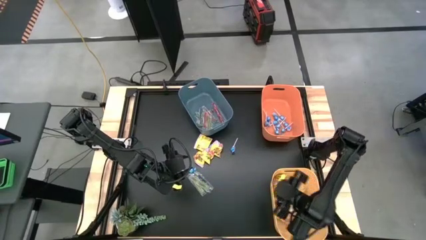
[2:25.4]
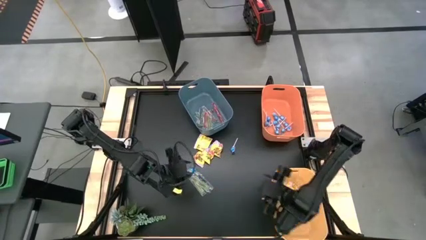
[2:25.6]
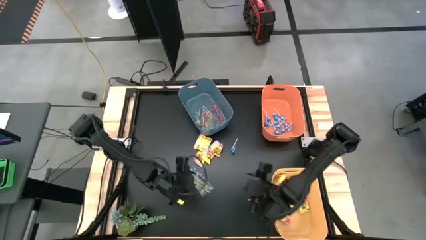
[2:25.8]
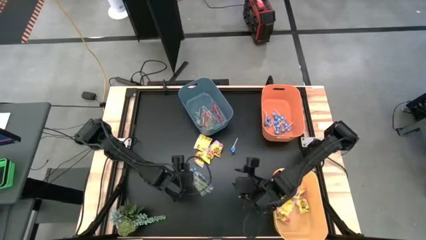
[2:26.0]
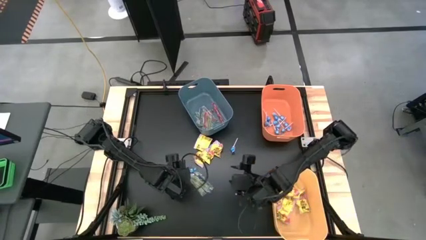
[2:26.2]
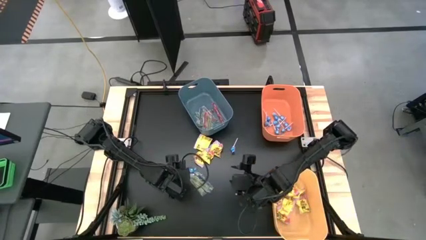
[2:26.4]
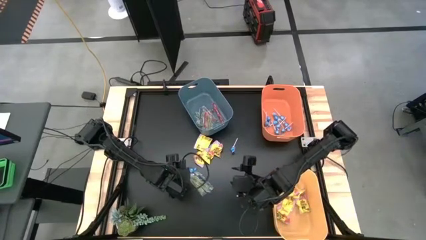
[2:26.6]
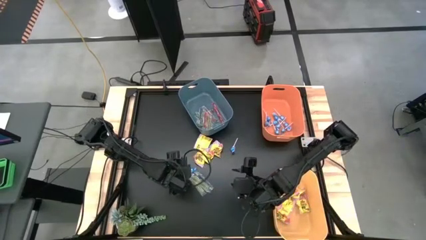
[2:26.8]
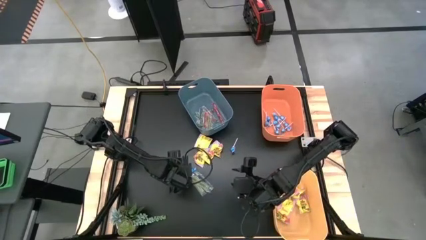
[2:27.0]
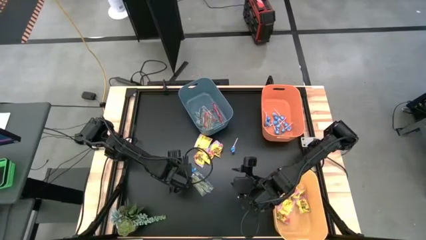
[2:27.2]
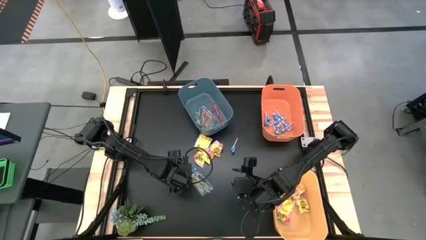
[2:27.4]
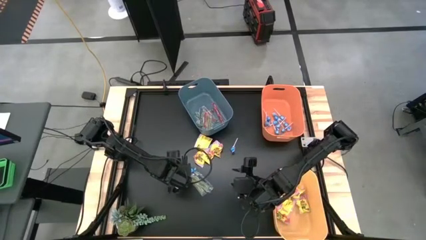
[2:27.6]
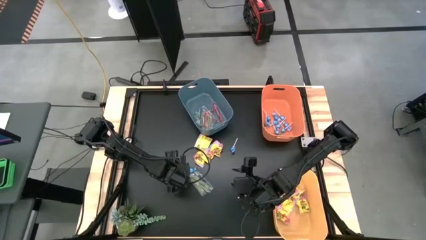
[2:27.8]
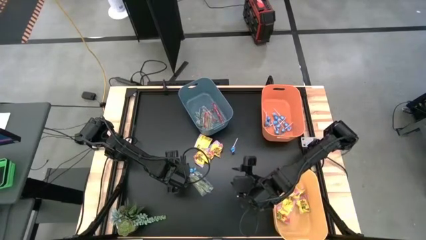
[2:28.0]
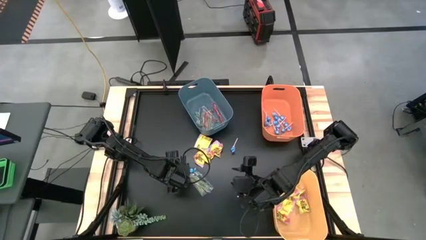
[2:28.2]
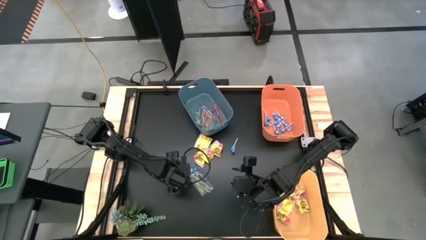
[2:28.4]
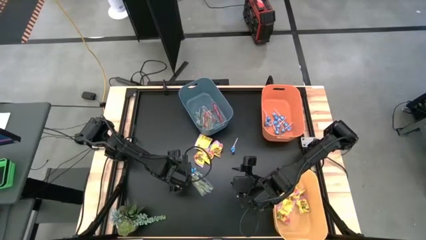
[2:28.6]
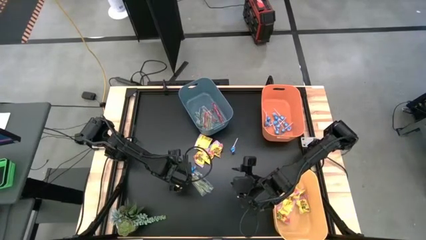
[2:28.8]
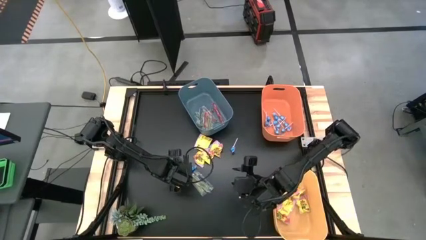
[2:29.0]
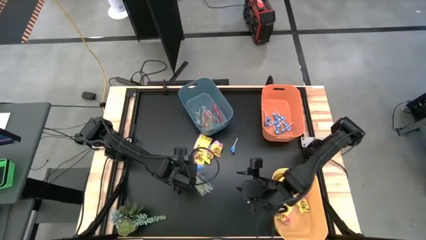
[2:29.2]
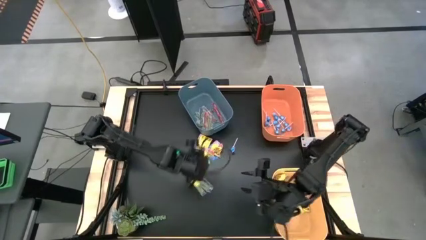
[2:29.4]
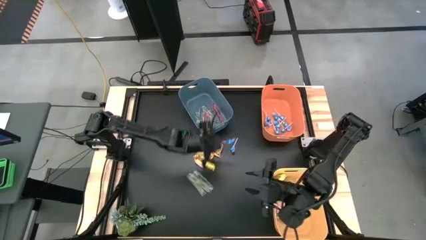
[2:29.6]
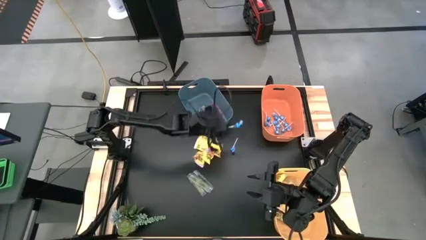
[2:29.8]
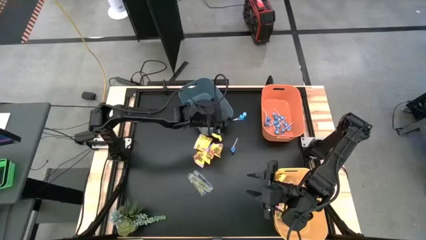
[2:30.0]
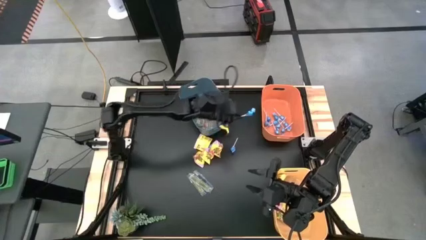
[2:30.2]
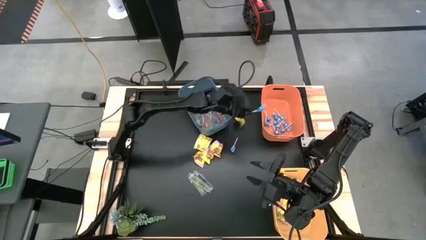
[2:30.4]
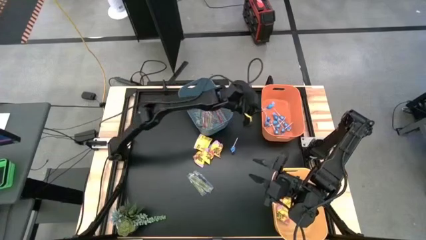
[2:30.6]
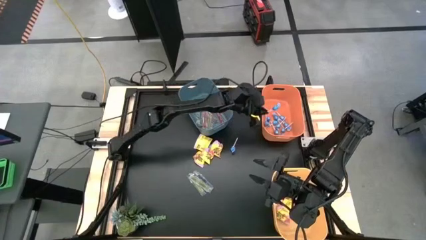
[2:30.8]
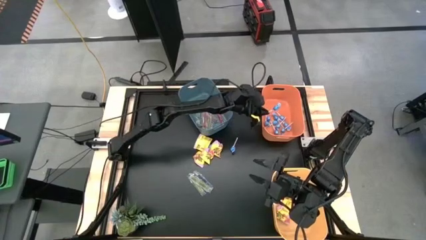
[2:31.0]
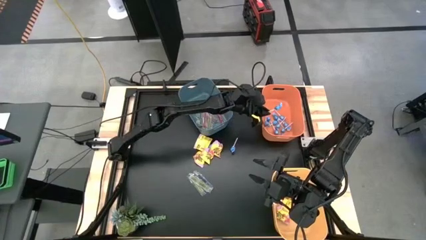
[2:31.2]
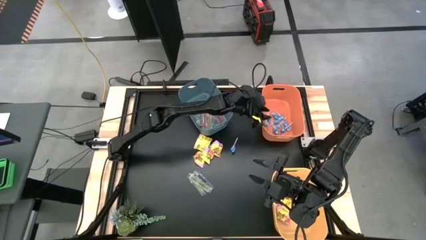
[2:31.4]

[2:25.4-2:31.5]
Task: Sort candy
Put the blue candy into the orange bin

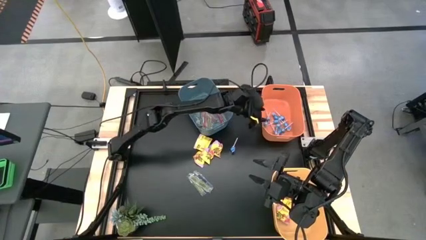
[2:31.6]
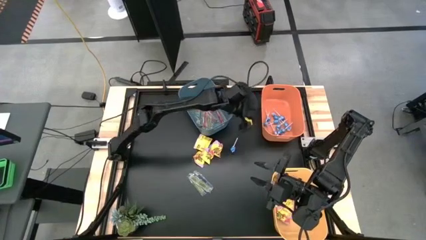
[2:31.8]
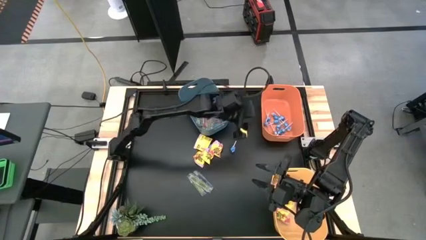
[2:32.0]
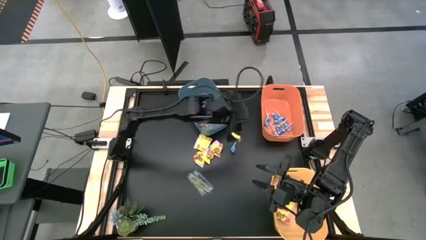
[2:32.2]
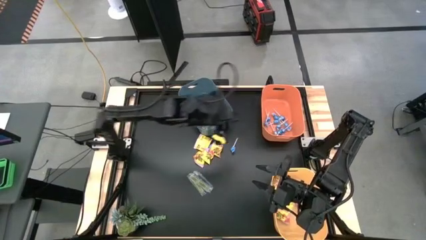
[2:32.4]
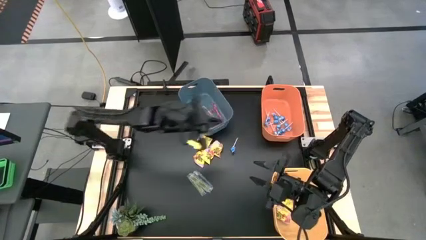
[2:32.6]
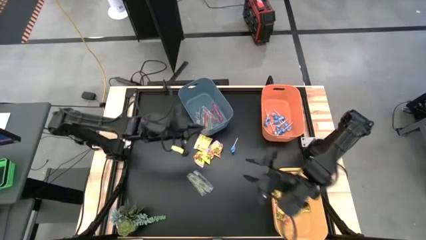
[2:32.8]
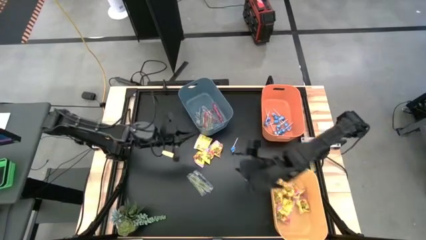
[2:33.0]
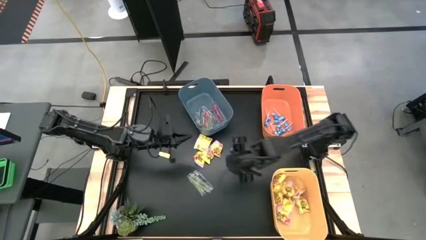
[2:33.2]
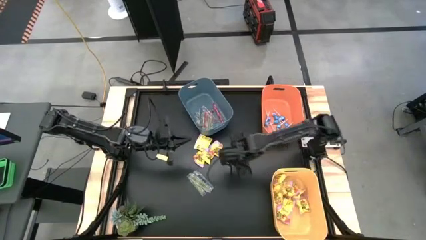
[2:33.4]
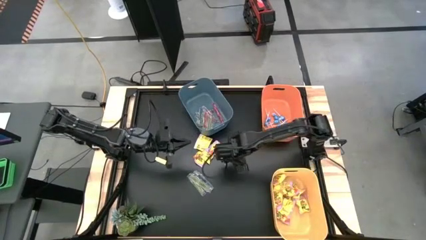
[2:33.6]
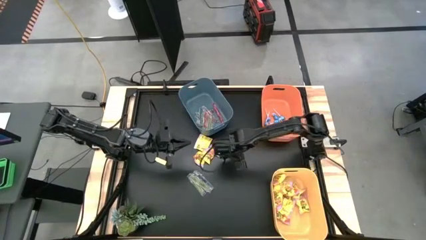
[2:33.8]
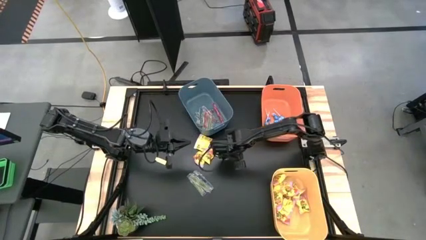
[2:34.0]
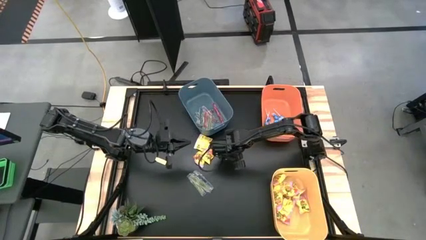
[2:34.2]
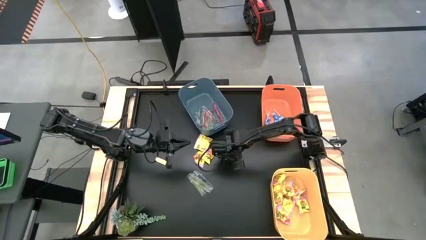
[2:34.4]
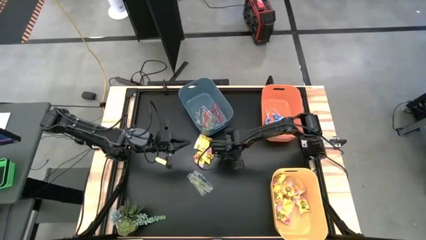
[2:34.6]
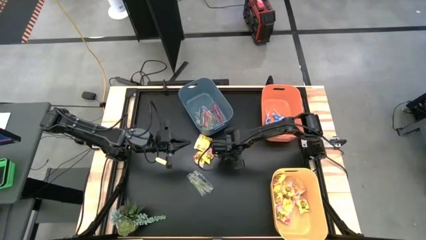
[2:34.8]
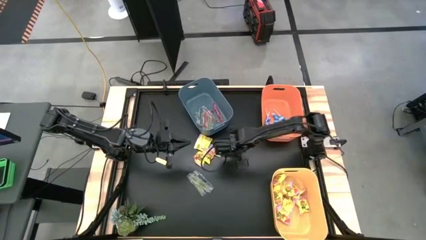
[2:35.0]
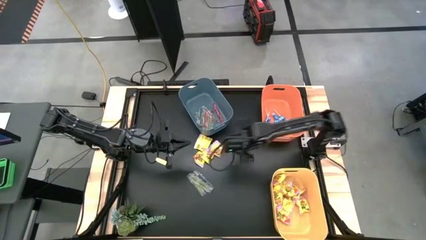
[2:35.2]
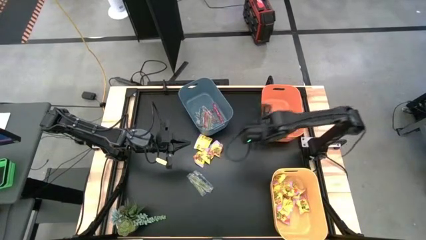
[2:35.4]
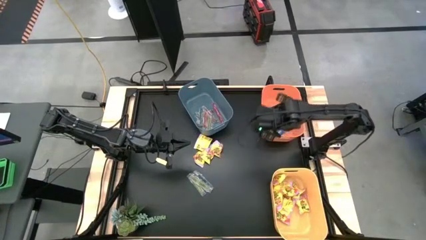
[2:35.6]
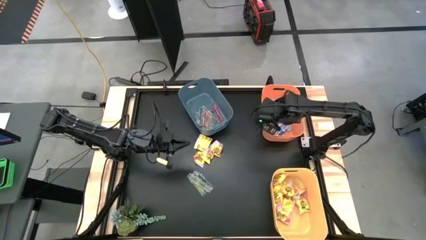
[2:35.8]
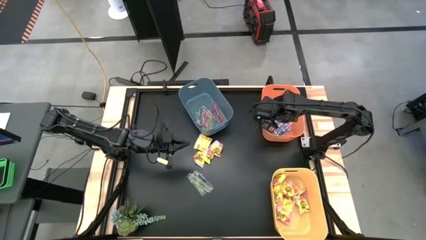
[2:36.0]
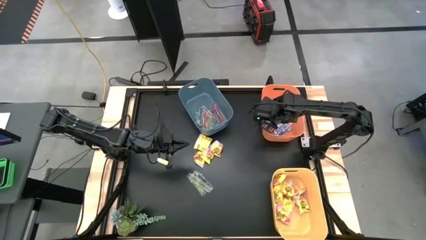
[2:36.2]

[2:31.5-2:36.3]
Put the blue candy into the orange bin

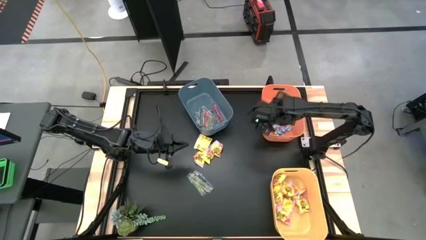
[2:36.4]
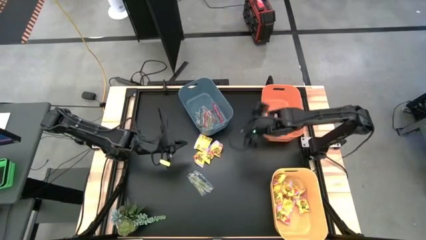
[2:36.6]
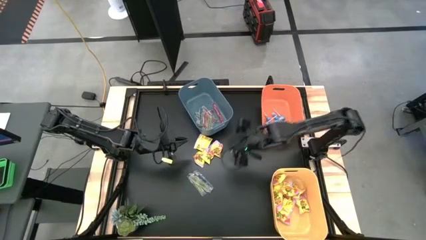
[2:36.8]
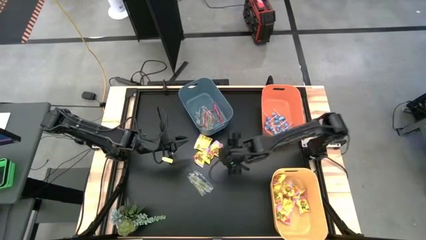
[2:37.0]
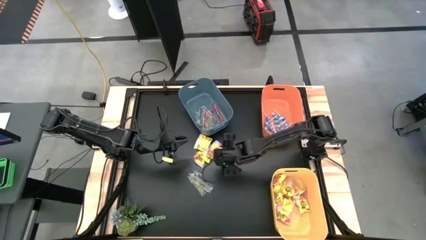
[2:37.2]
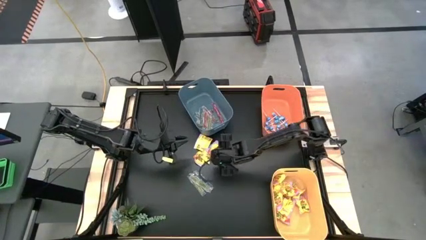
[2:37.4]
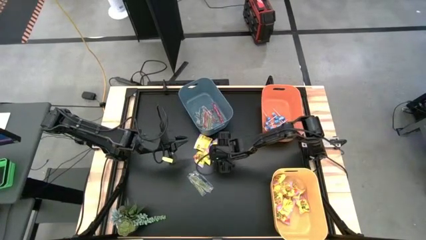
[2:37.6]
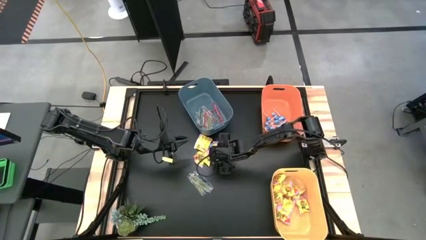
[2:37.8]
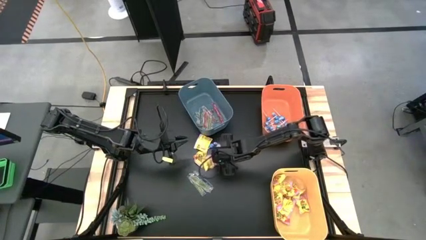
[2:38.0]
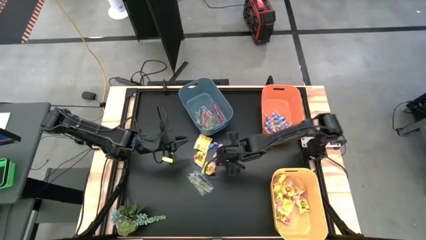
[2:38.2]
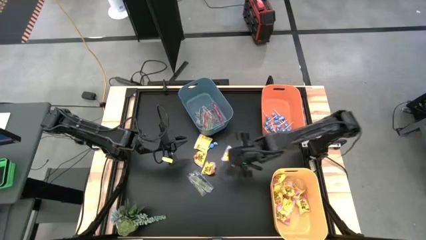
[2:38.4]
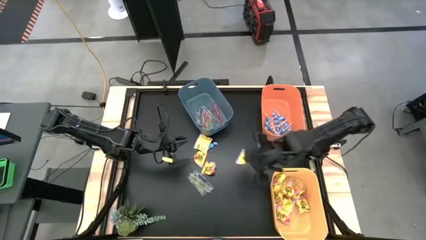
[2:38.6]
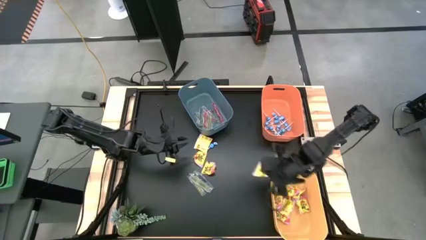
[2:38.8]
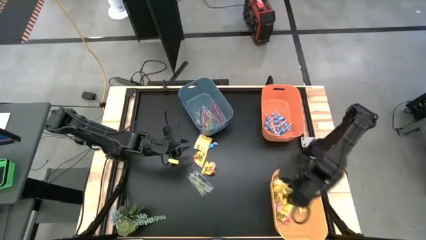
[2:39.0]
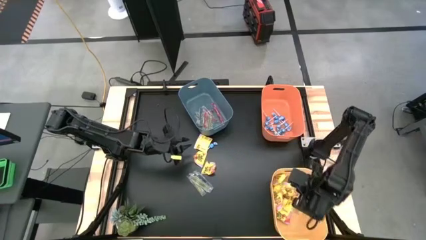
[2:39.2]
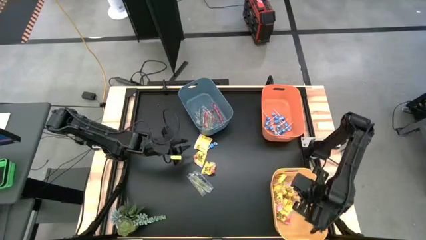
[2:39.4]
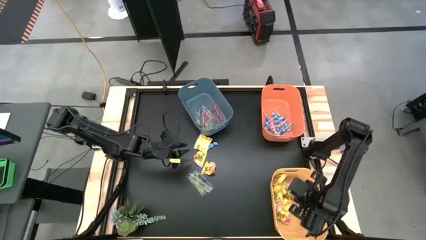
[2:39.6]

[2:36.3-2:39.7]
Put the yellow candy into the yellow bin

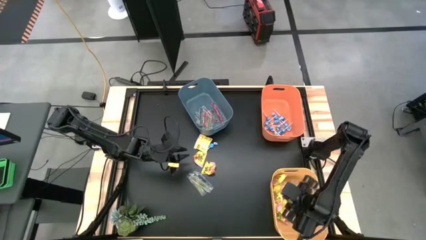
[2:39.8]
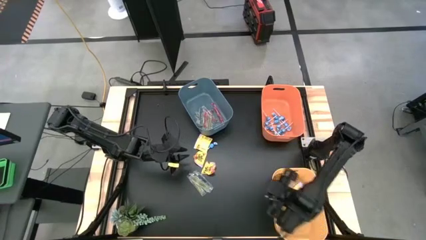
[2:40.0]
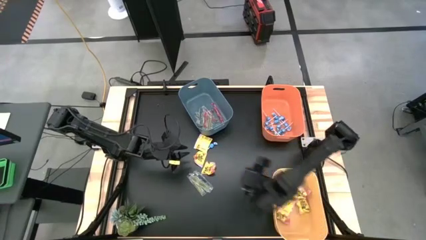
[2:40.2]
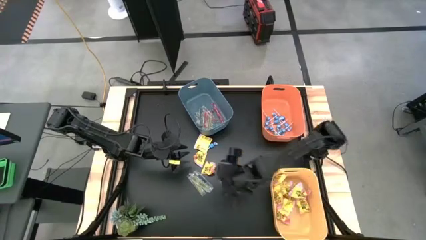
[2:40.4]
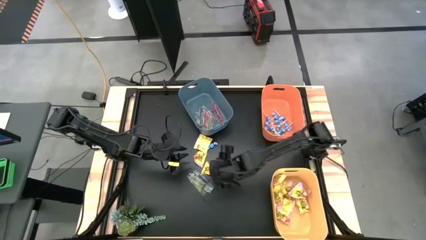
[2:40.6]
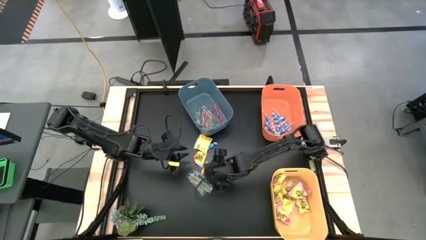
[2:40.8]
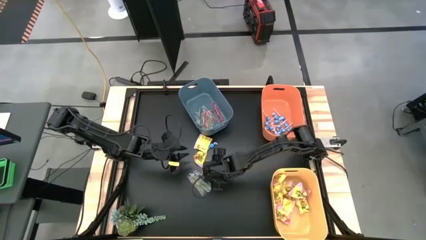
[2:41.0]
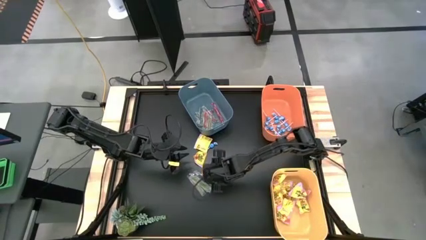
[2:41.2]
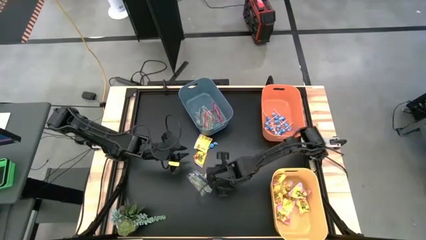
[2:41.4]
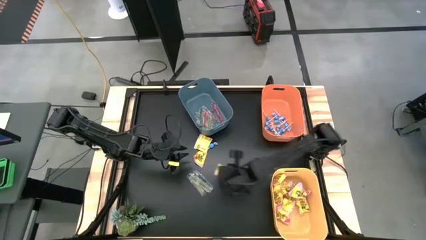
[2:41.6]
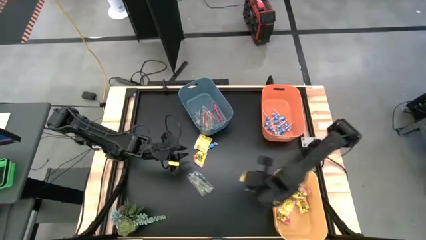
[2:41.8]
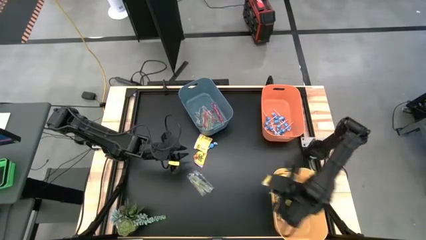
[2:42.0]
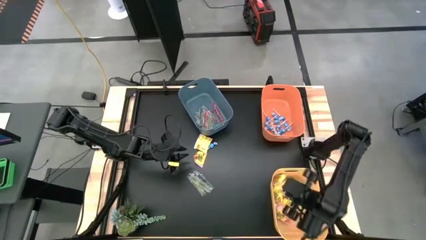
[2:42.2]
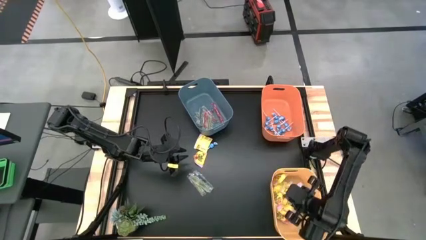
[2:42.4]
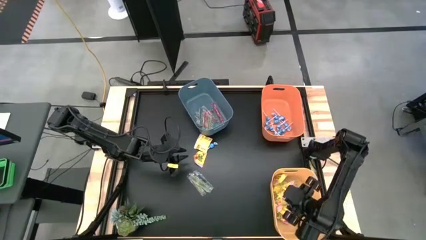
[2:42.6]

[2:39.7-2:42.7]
Put the yellow candy into the yellow bin
